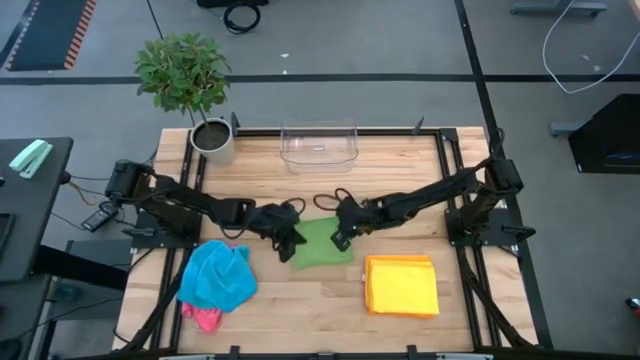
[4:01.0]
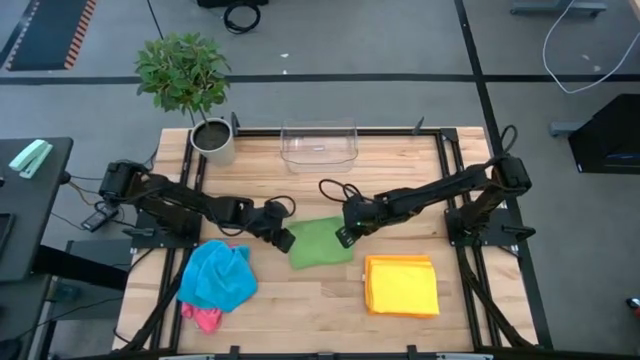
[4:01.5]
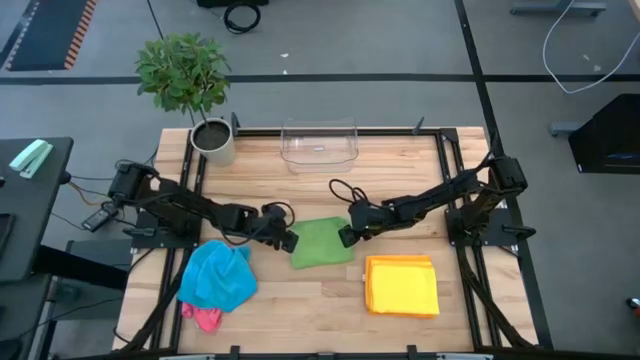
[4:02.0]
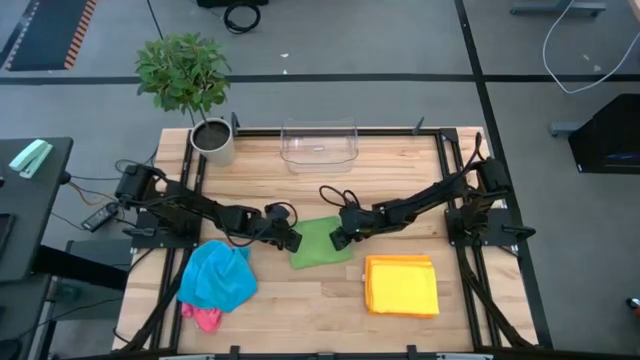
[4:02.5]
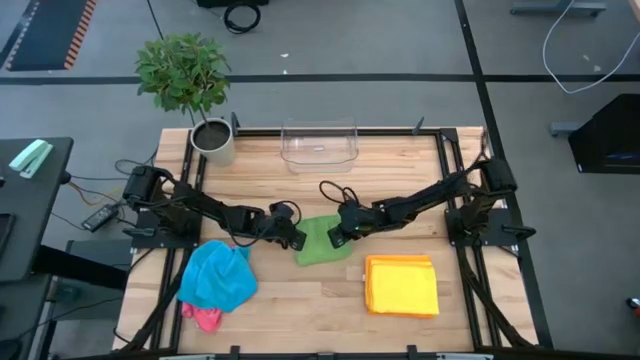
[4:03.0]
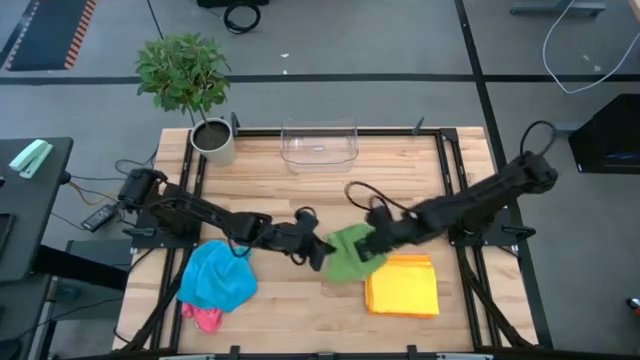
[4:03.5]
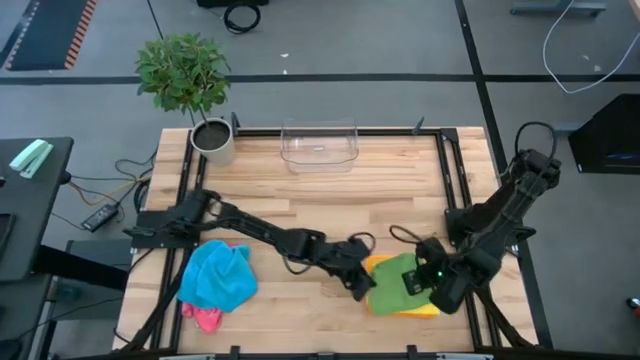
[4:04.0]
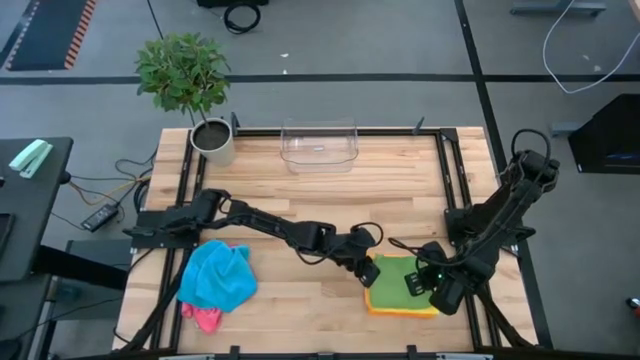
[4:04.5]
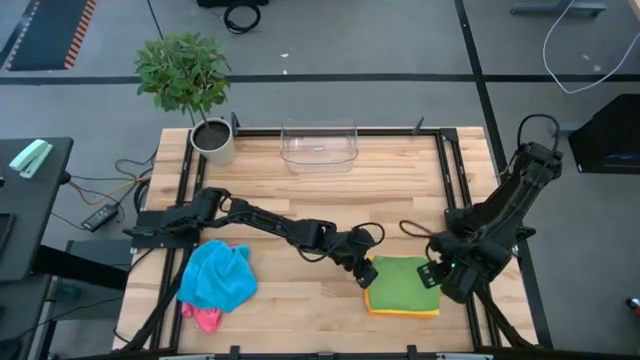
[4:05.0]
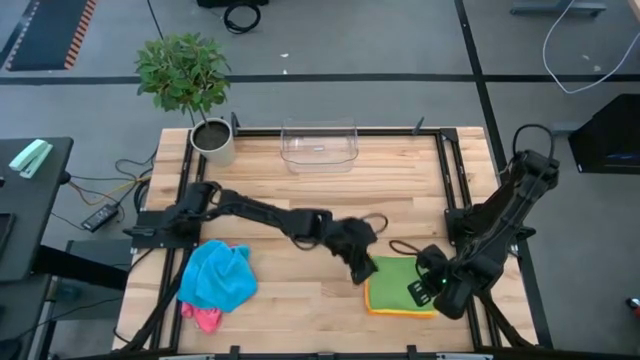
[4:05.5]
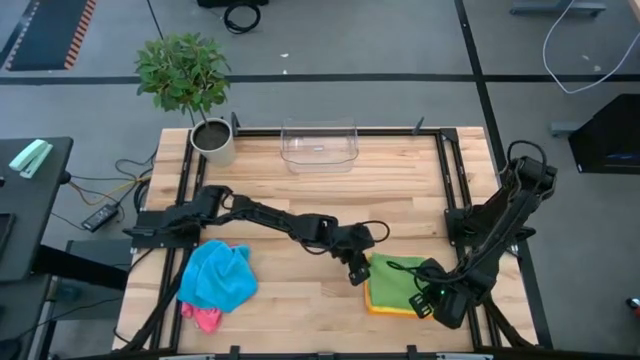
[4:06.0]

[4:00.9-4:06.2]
Task: Fold microfiber towels
Stack the green towel on the yellow towel

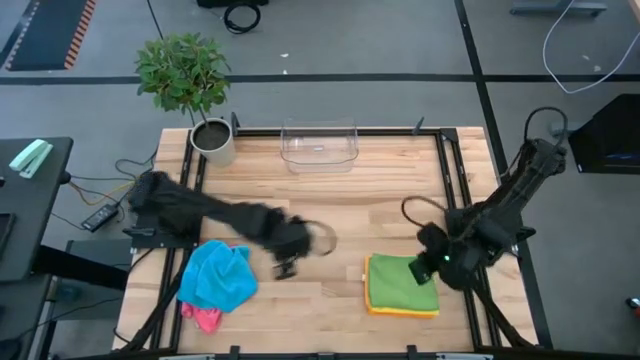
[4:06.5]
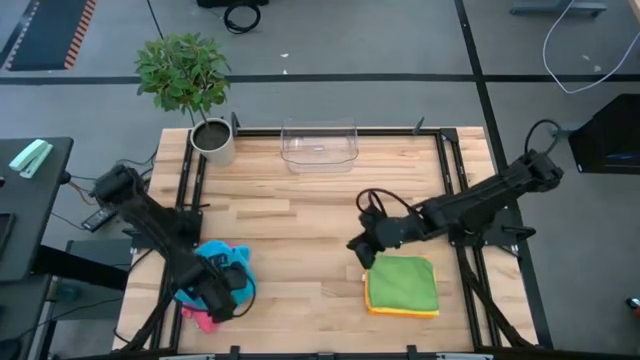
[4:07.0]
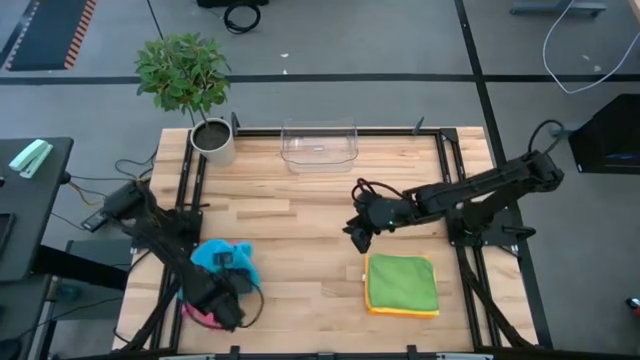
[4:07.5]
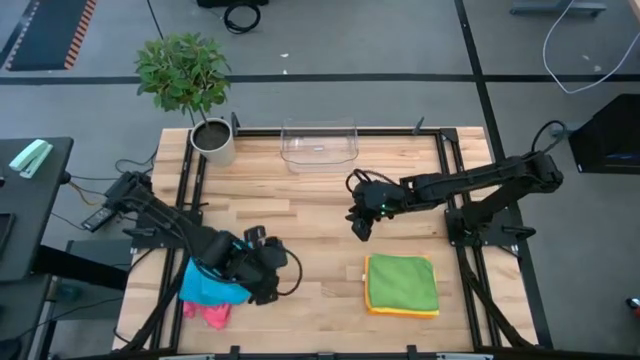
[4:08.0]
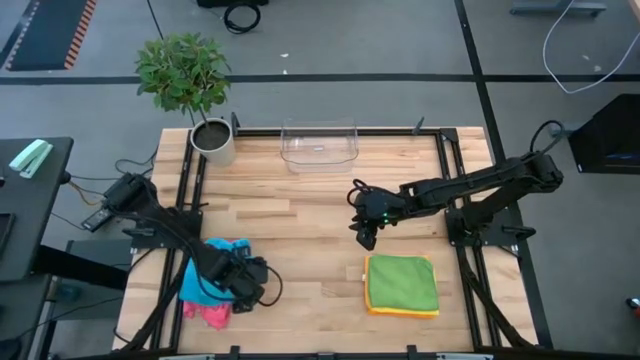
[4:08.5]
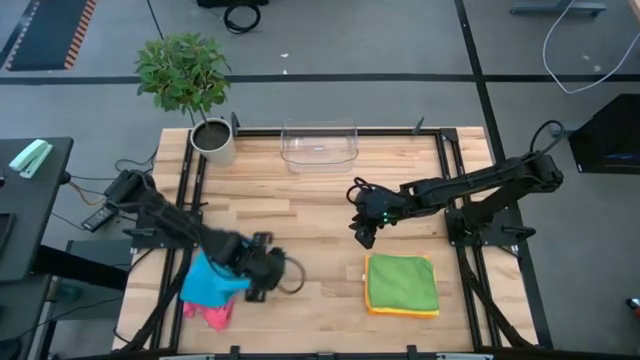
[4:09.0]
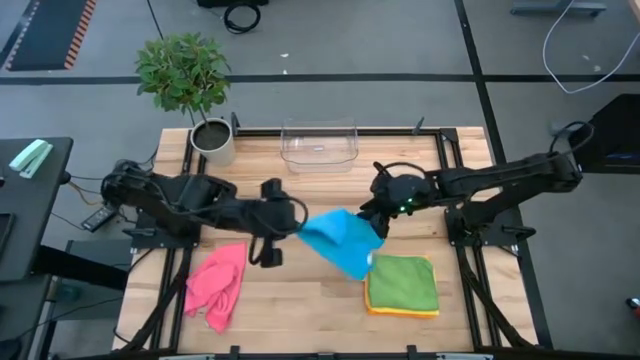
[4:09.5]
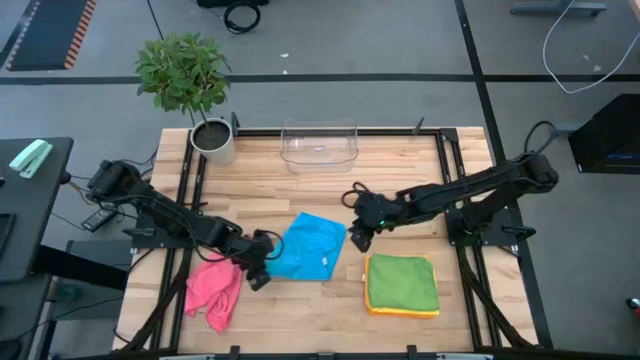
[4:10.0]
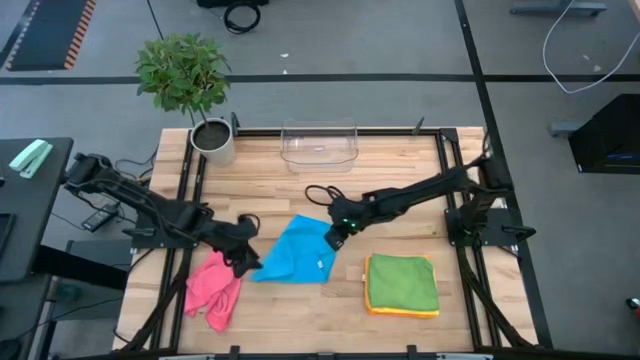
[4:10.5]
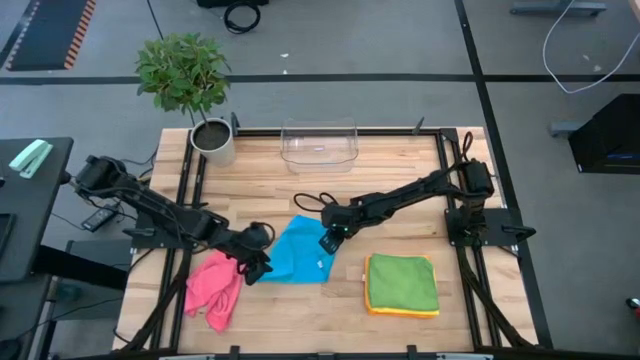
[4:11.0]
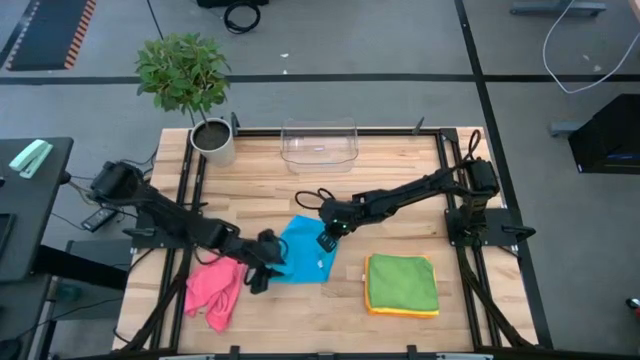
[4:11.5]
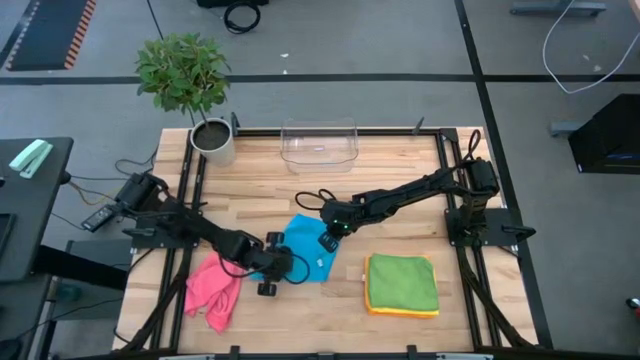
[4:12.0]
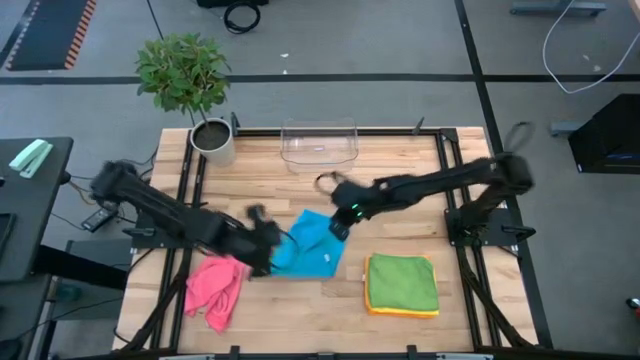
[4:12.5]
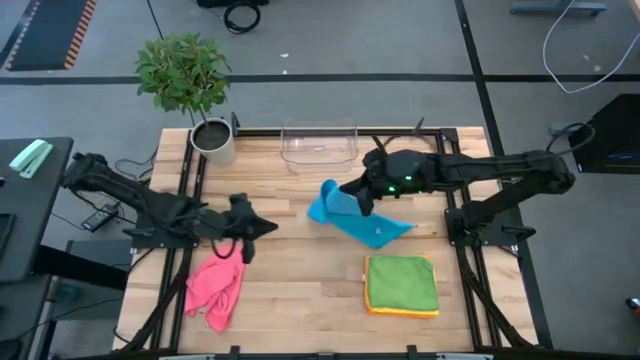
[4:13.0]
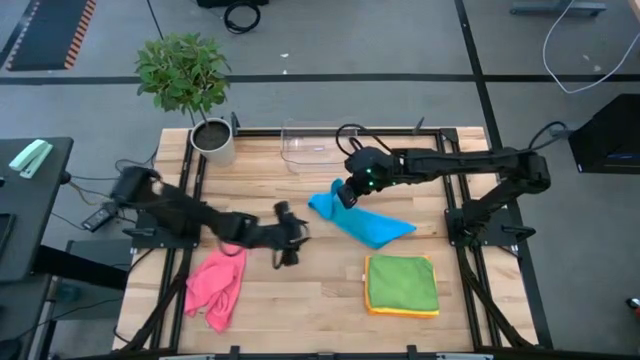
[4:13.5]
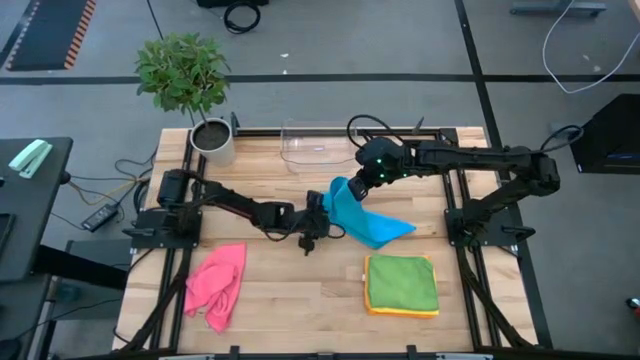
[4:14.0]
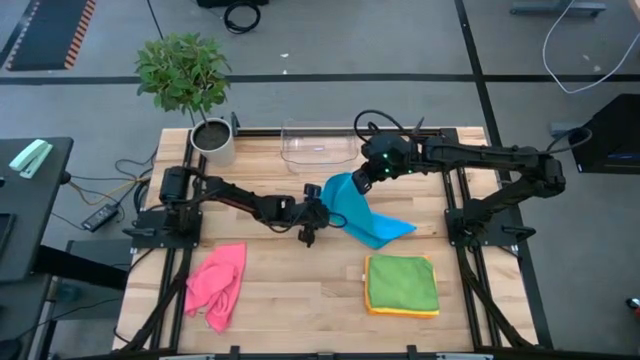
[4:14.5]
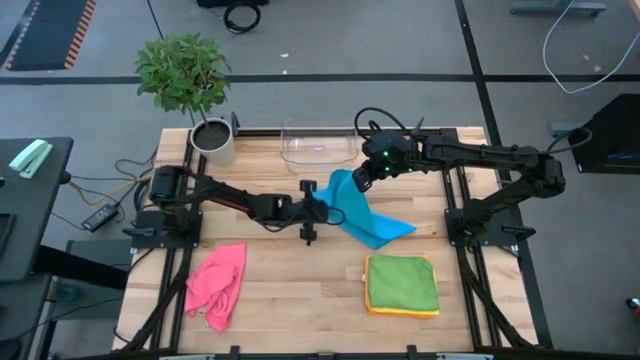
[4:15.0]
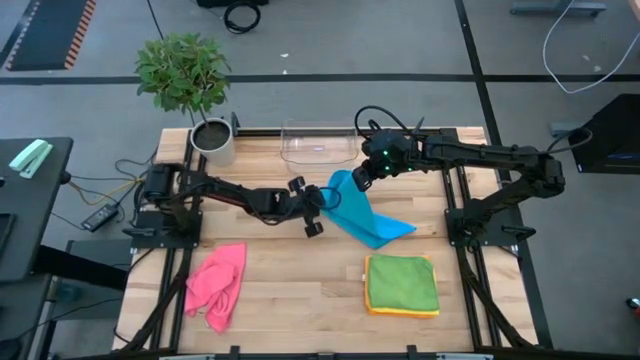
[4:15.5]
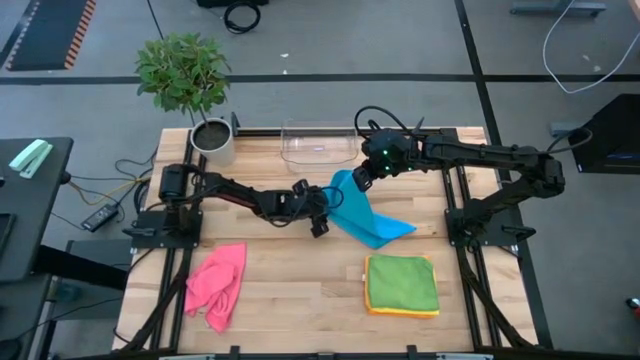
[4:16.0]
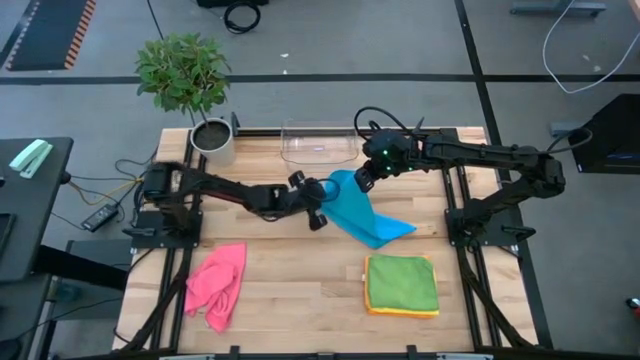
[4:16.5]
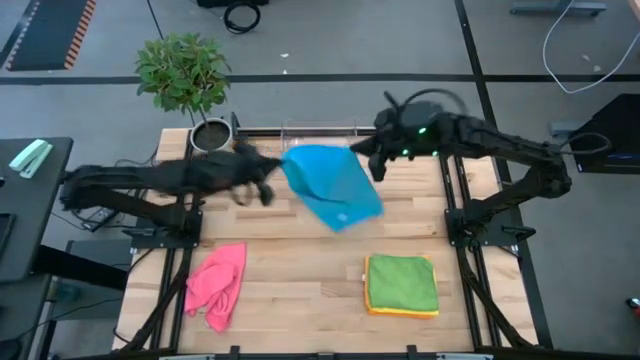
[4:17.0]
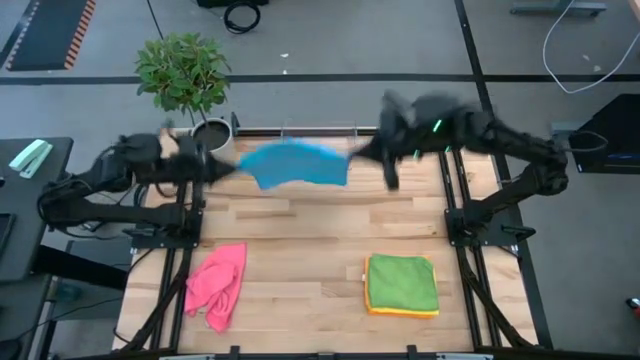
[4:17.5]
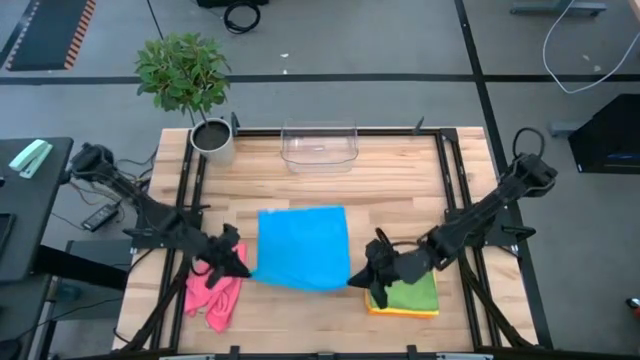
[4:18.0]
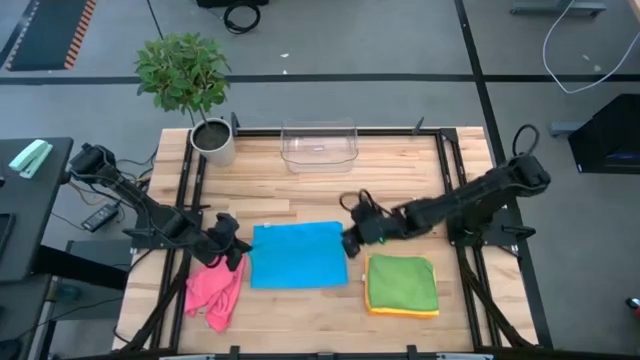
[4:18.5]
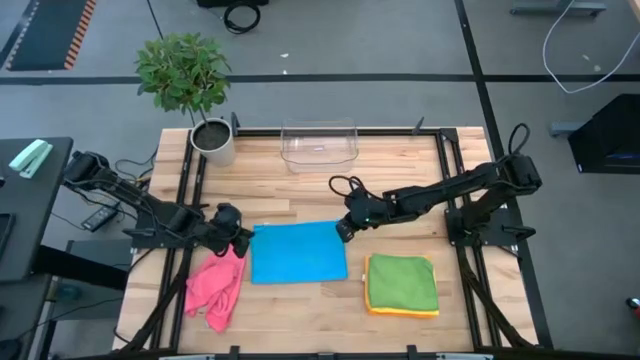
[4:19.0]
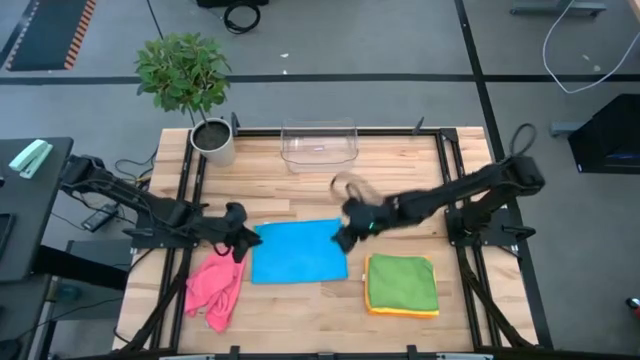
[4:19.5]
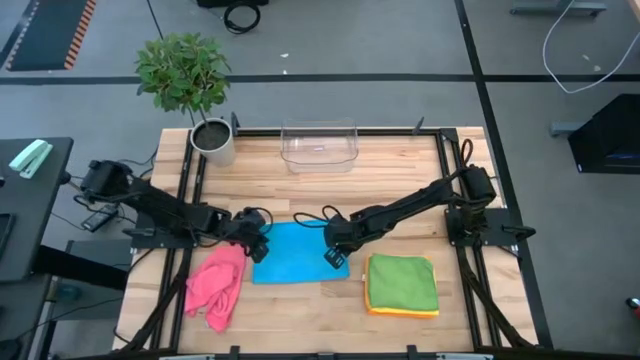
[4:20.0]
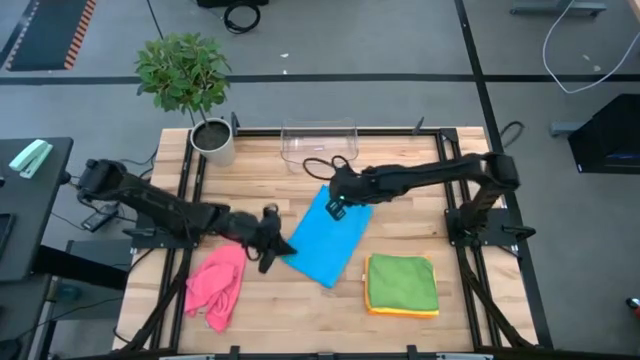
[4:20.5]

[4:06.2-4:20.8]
Fold the blue towel on the table
